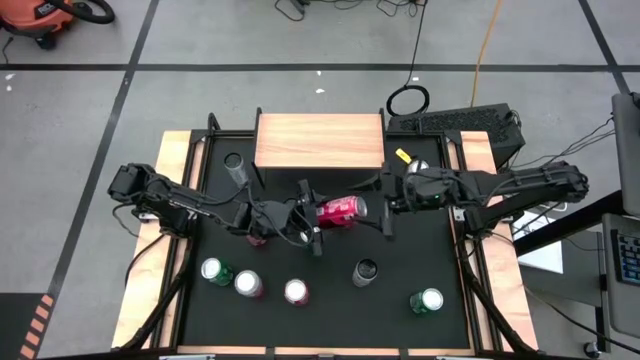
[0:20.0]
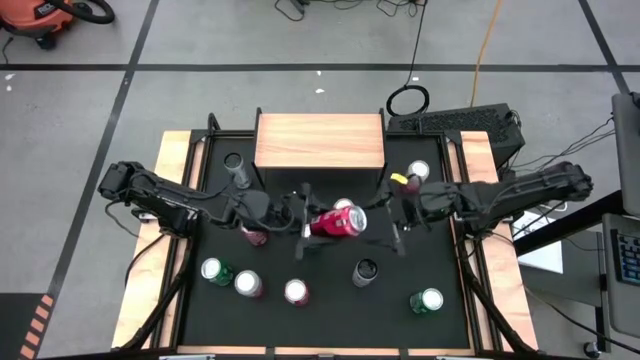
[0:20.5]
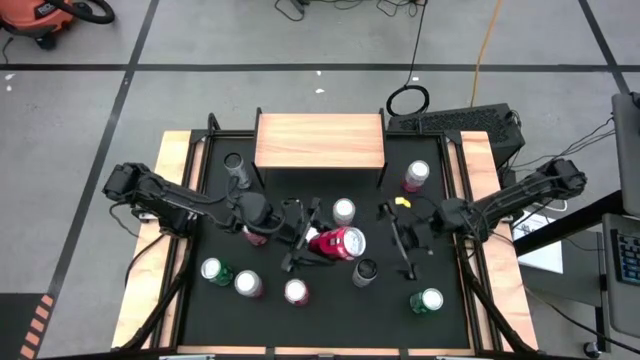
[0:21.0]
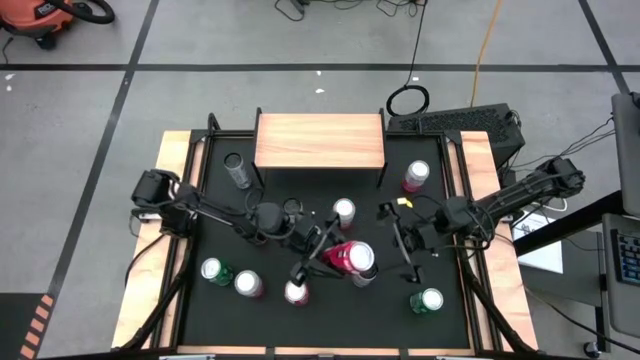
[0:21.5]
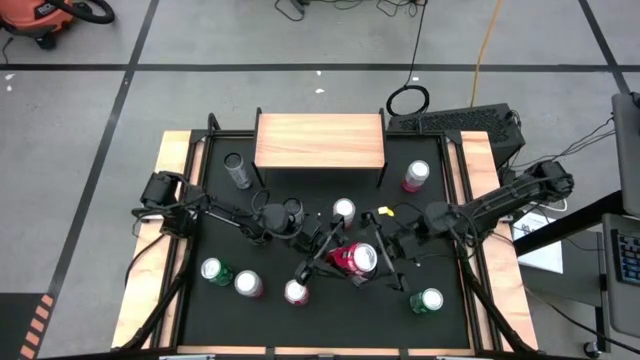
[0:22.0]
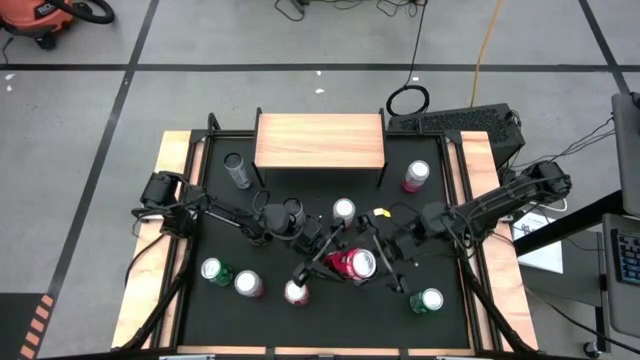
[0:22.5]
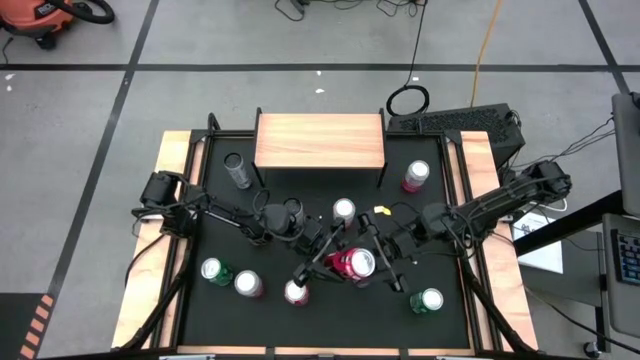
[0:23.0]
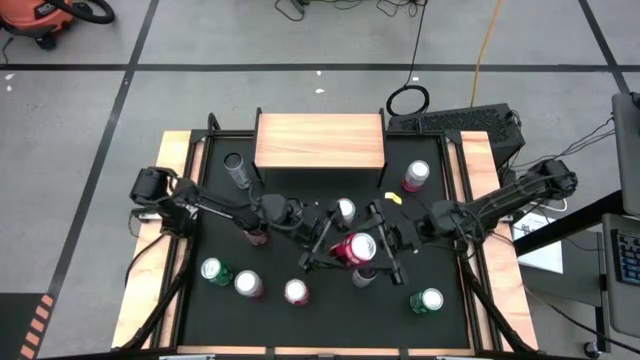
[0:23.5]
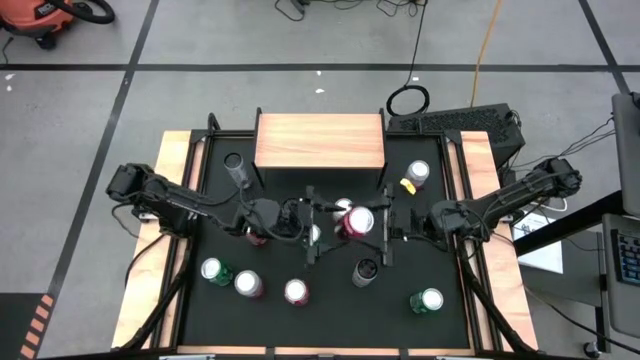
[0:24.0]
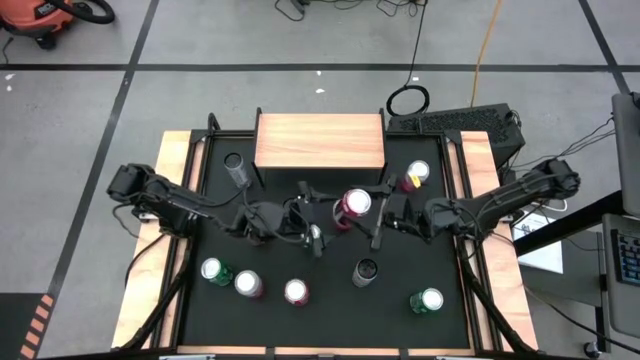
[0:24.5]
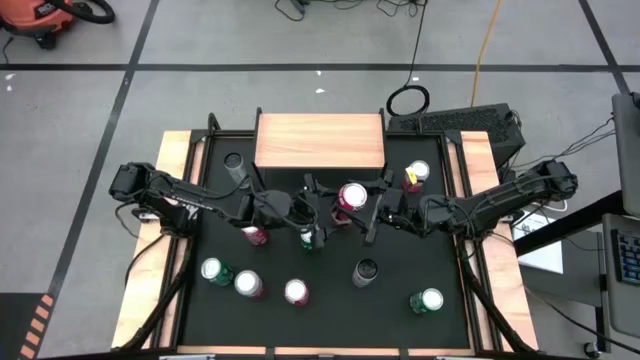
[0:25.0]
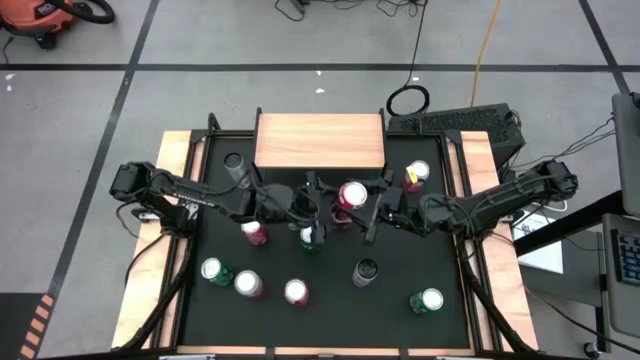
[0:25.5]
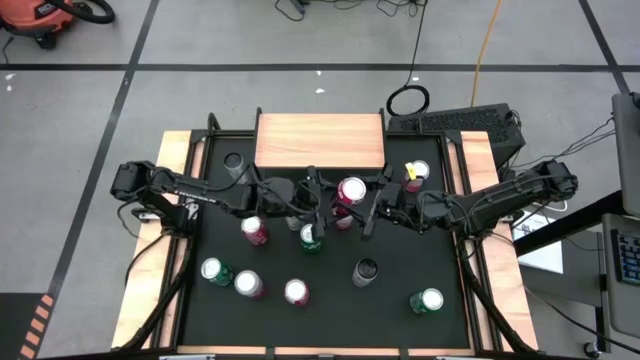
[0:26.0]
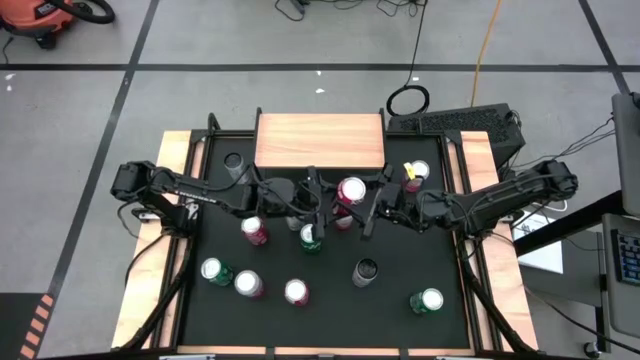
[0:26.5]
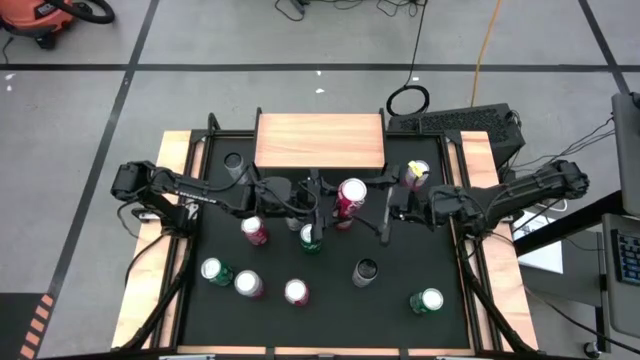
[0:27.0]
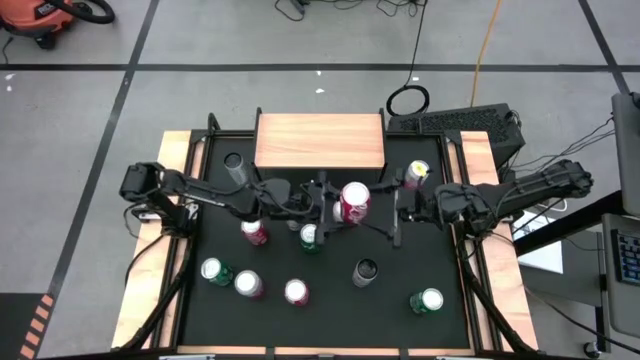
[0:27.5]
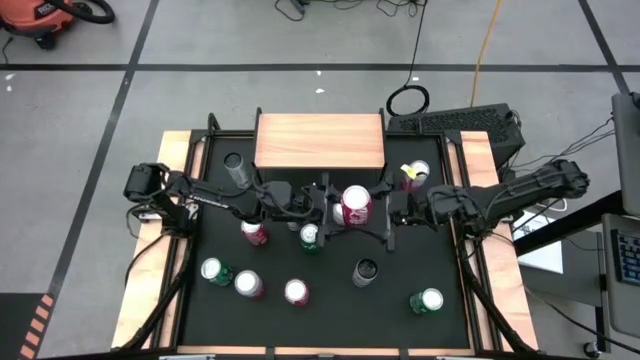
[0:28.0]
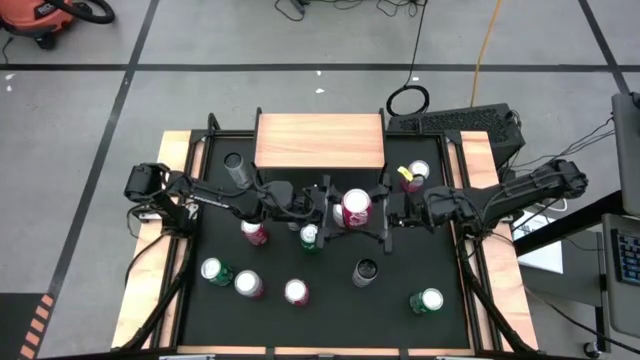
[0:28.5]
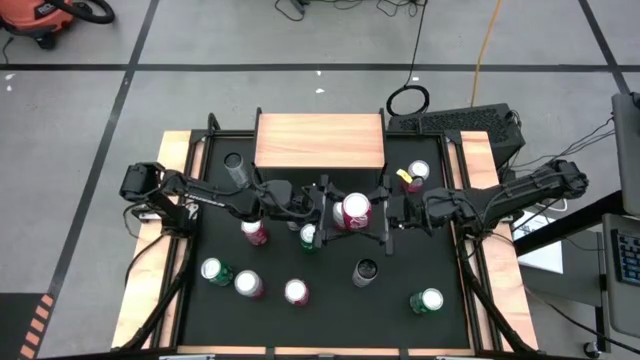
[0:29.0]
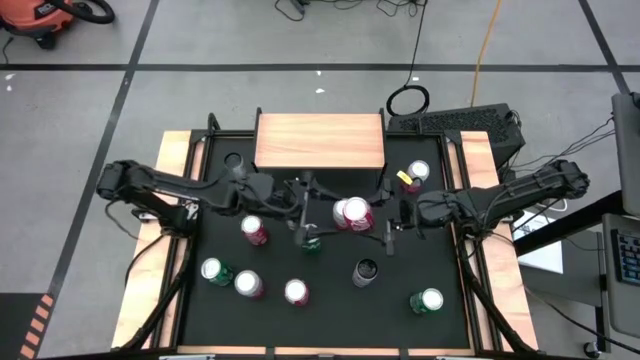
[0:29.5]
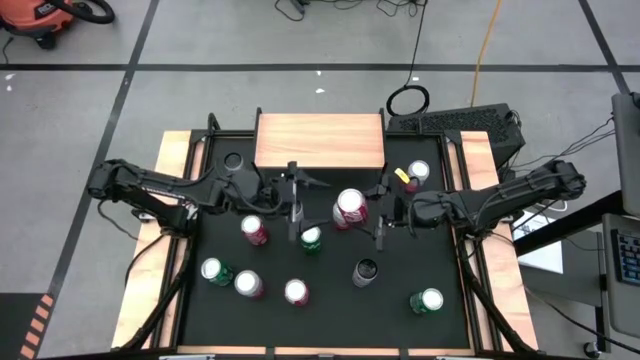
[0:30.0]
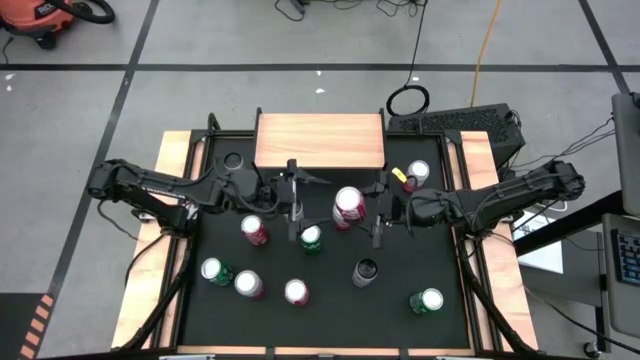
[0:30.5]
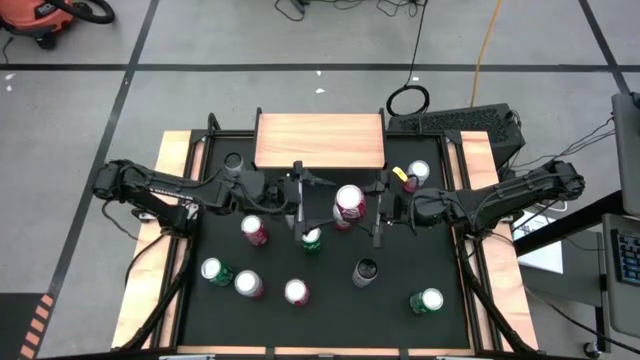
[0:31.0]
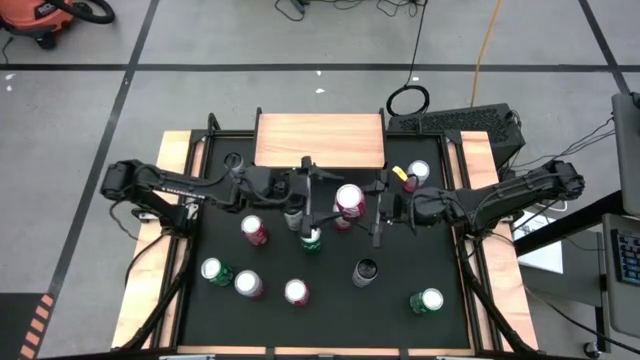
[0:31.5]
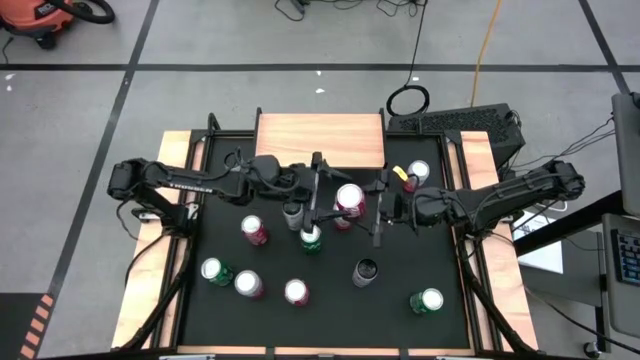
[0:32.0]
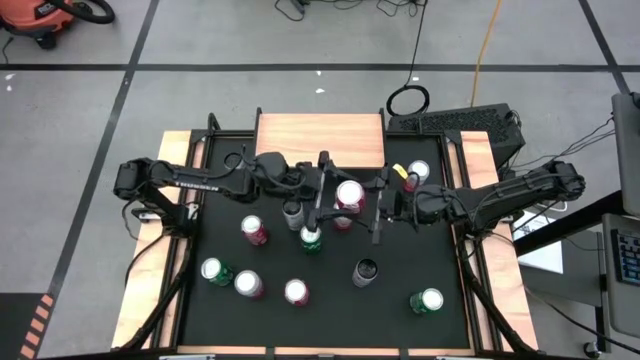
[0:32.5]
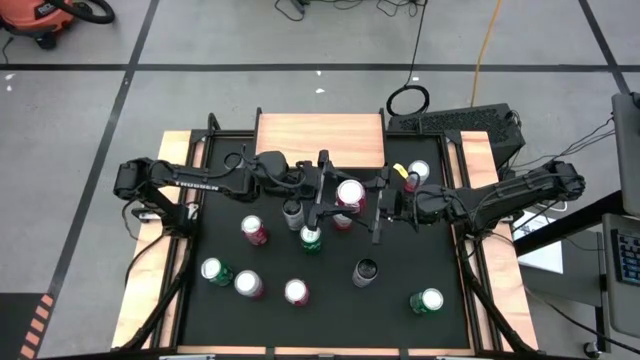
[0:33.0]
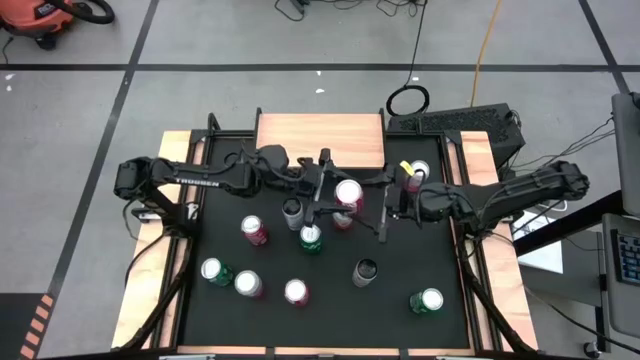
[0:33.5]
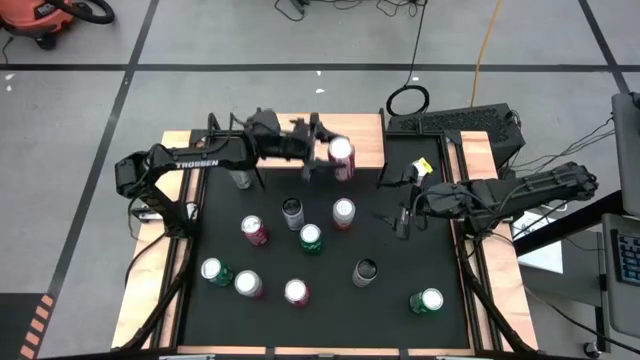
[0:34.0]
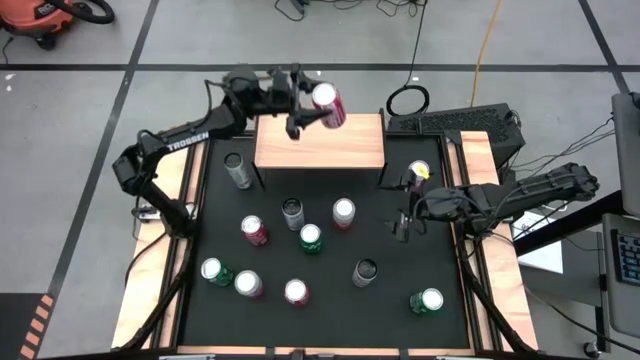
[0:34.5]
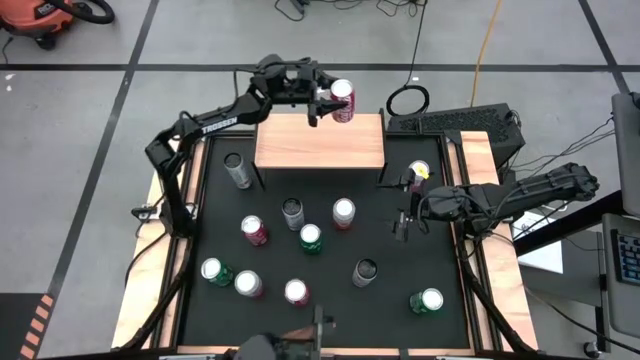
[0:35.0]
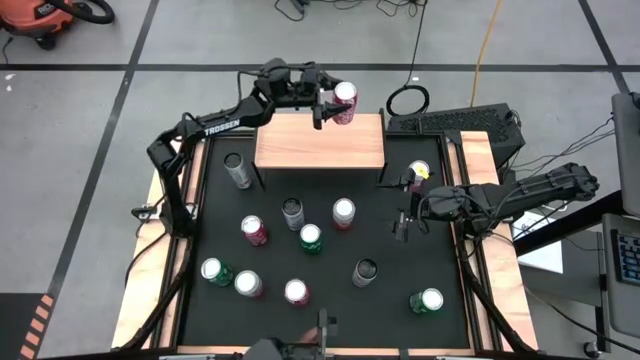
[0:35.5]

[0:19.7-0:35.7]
Task: Place canned beverage on shelf
Put the top right red soda can on the shelf

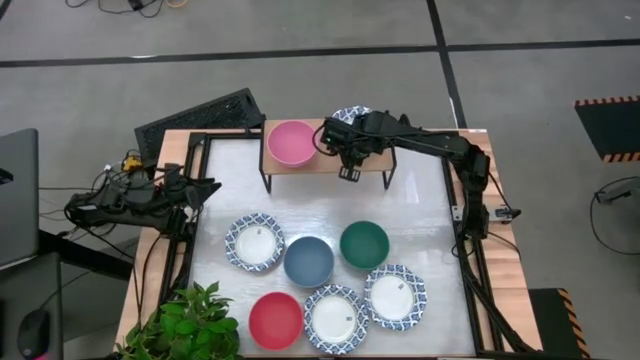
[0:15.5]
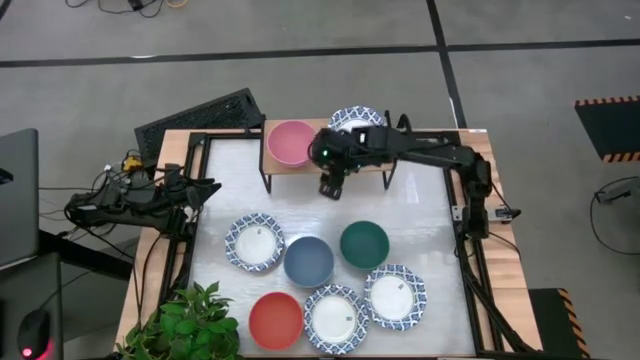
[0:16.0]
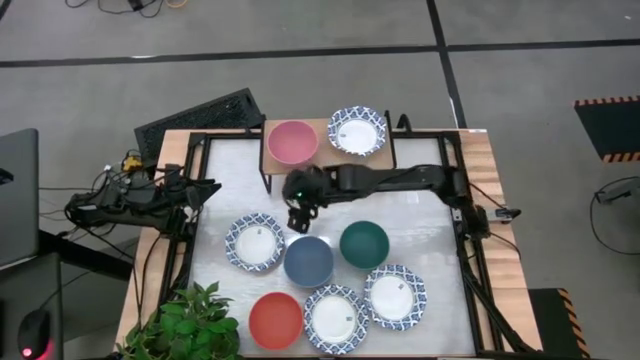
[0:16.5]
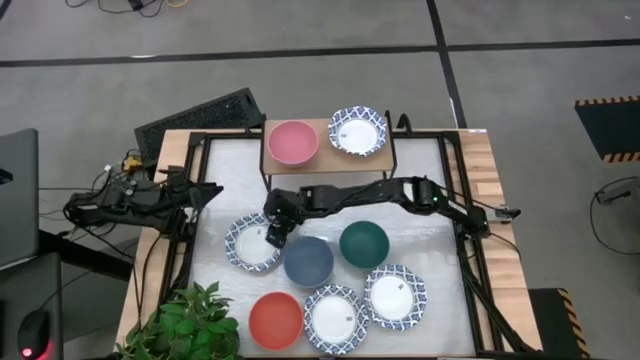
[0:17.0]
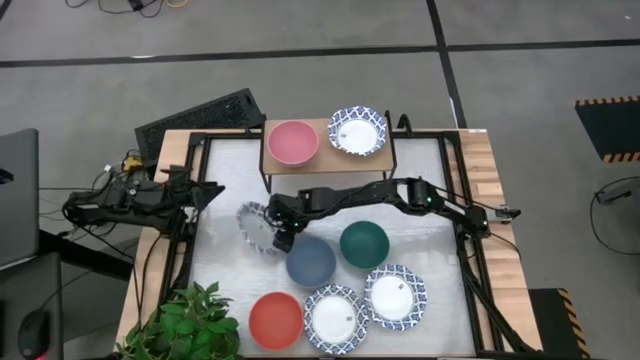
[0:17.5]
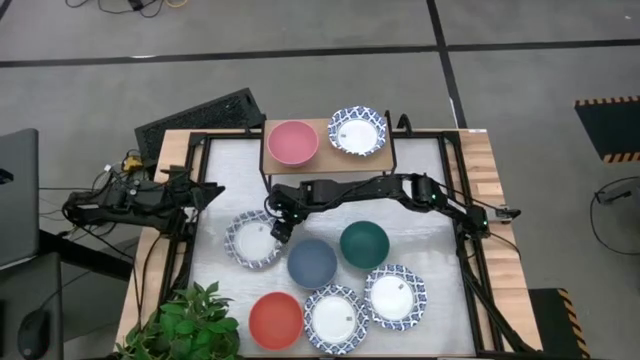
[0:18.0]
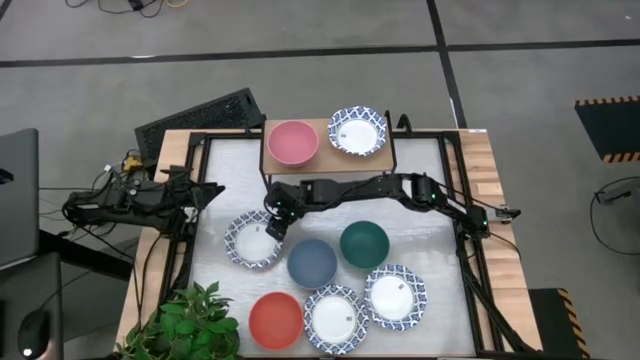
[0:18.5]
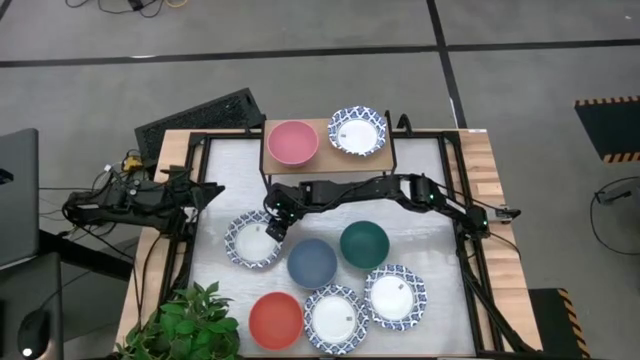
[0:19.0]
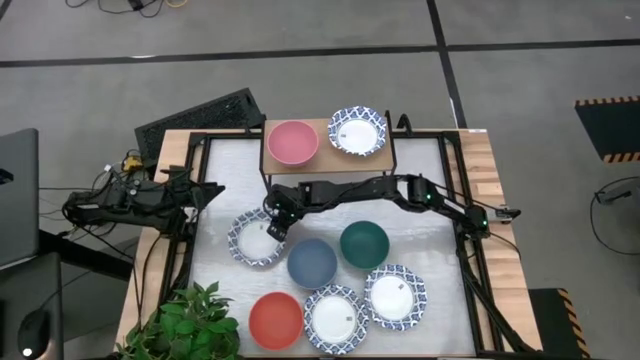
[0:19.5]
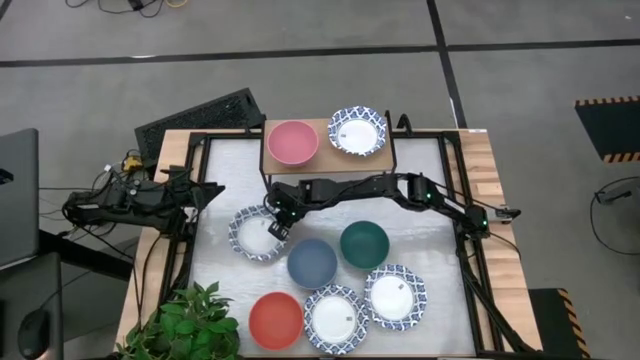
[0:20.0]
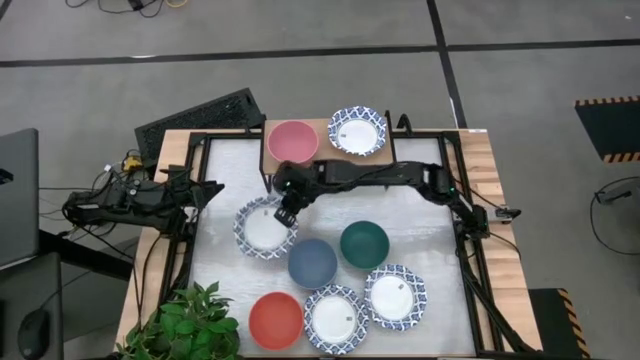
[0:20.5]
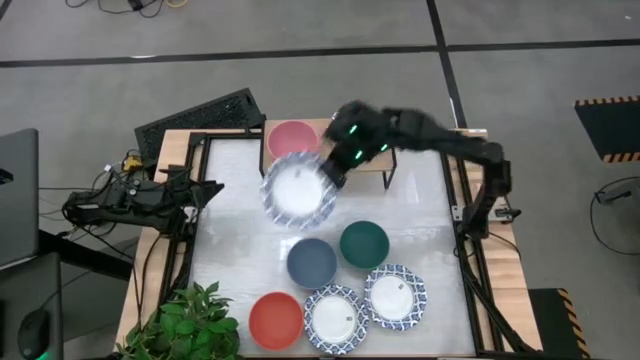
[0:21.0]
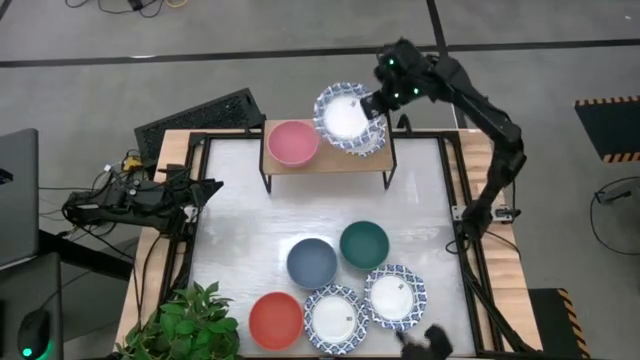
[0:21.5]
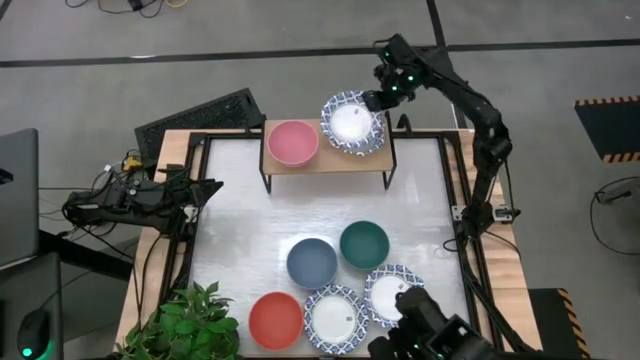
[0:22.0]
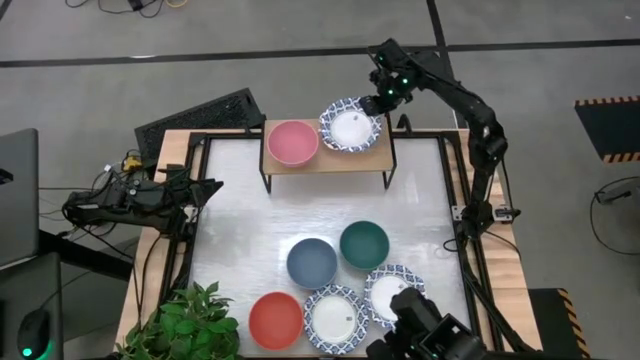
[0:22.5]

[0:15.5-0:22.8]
Task: Place and stack bowls onto a shelf
Stack the white patterned bowl on top of the white patterned bowl on the shelf
